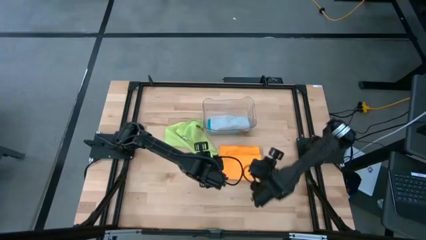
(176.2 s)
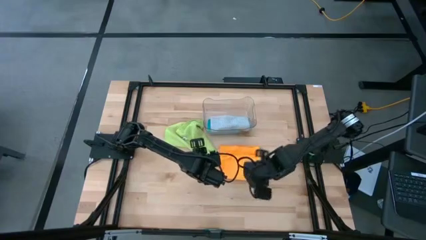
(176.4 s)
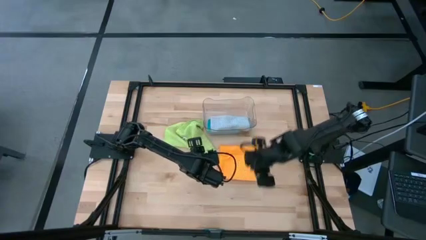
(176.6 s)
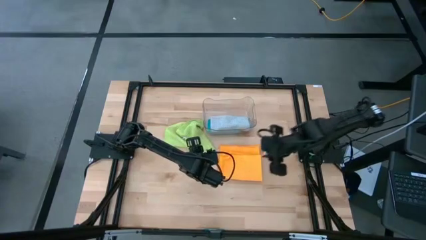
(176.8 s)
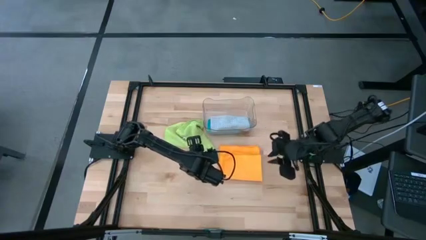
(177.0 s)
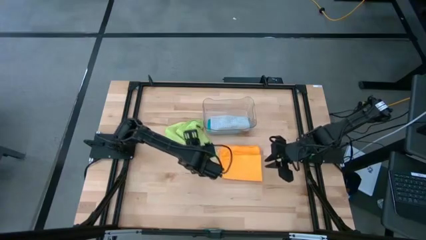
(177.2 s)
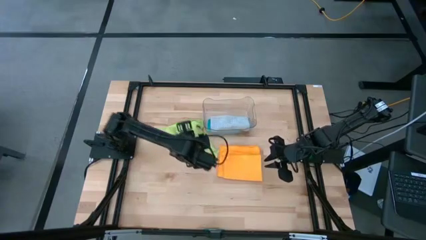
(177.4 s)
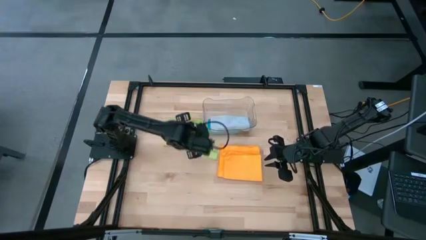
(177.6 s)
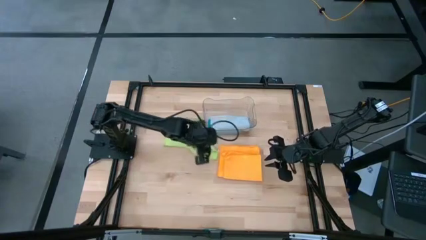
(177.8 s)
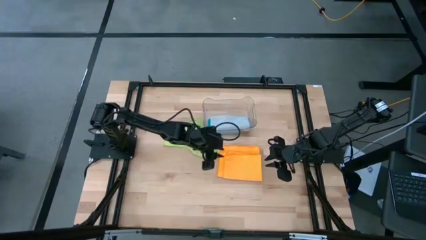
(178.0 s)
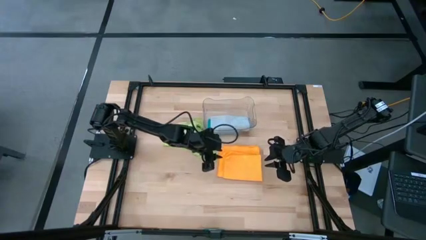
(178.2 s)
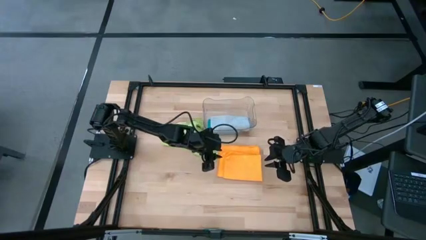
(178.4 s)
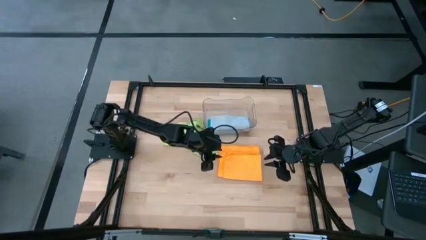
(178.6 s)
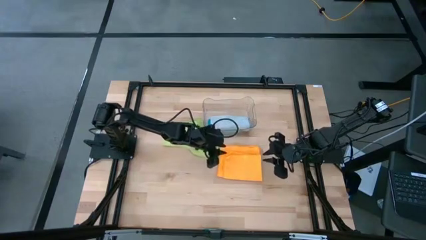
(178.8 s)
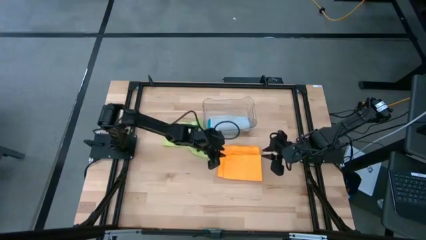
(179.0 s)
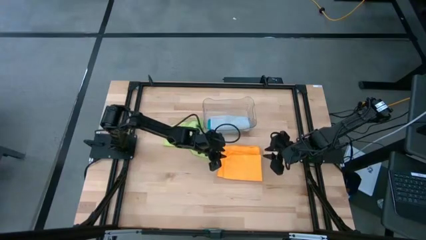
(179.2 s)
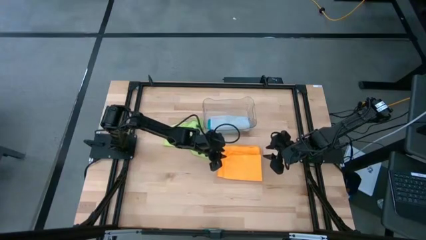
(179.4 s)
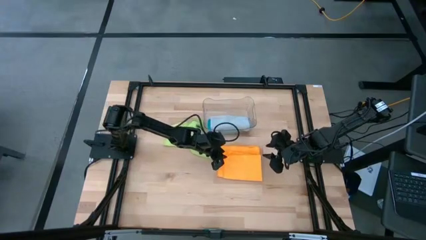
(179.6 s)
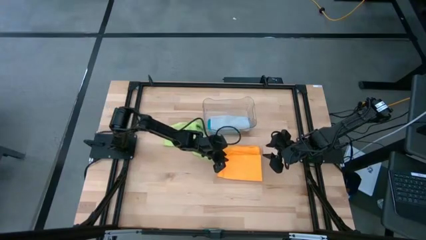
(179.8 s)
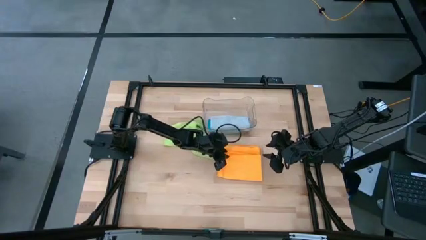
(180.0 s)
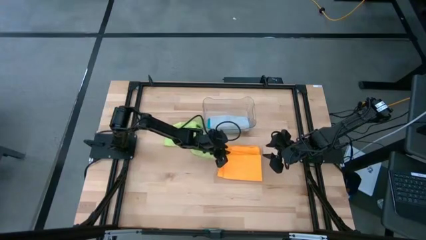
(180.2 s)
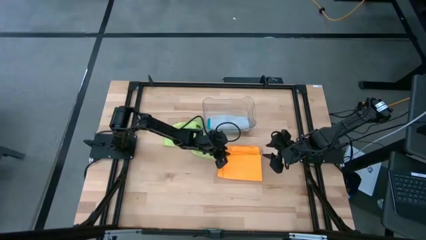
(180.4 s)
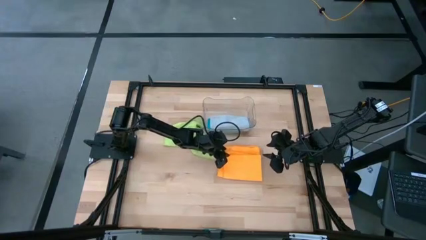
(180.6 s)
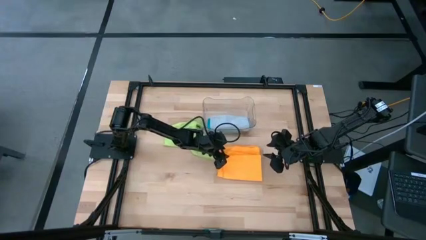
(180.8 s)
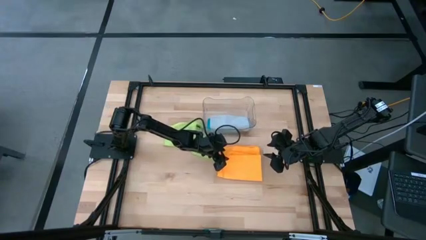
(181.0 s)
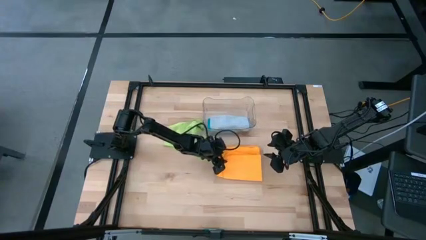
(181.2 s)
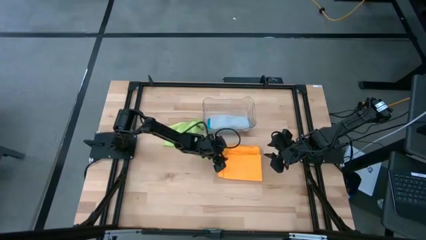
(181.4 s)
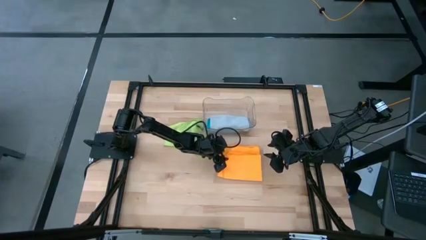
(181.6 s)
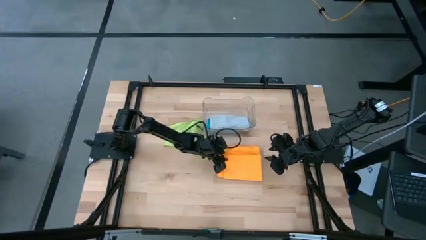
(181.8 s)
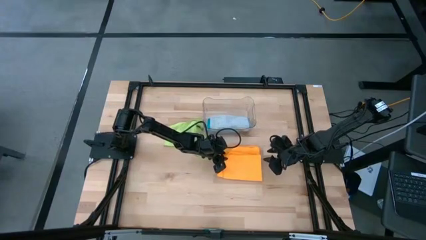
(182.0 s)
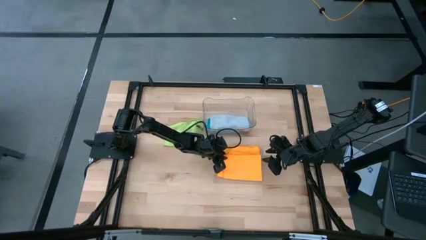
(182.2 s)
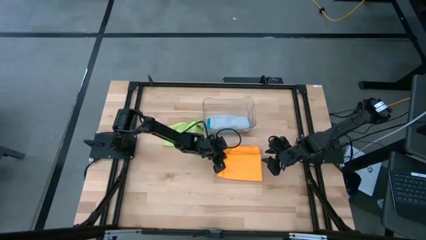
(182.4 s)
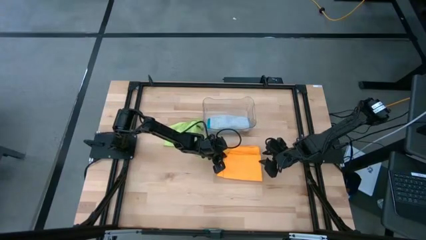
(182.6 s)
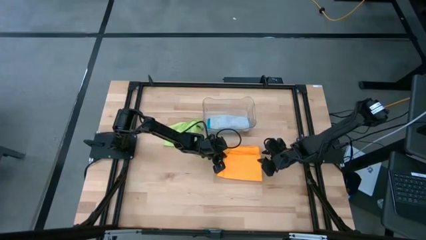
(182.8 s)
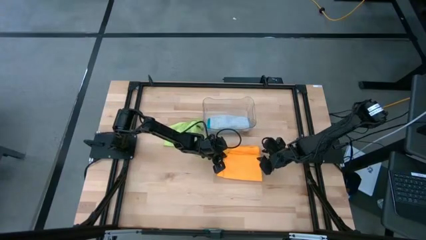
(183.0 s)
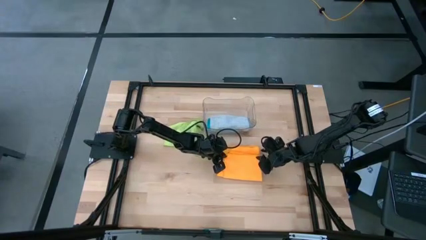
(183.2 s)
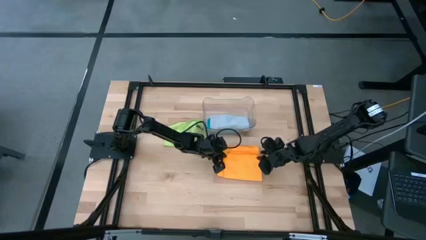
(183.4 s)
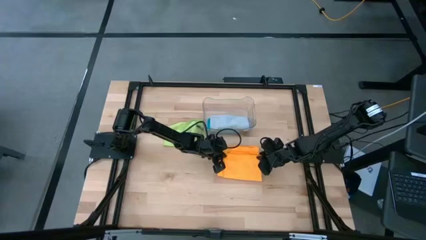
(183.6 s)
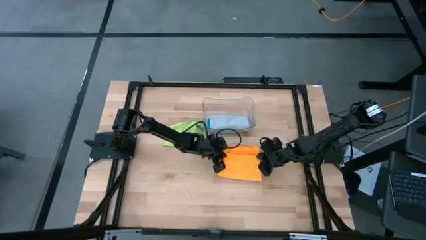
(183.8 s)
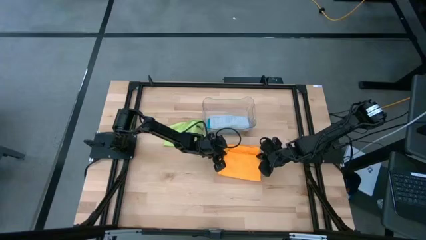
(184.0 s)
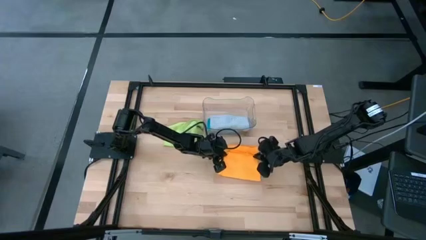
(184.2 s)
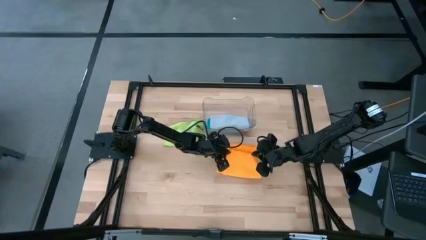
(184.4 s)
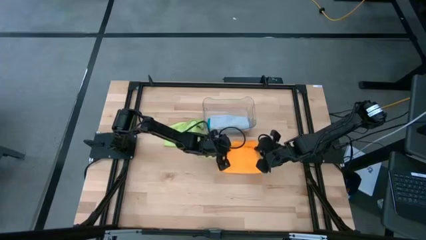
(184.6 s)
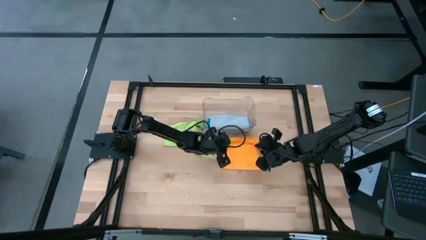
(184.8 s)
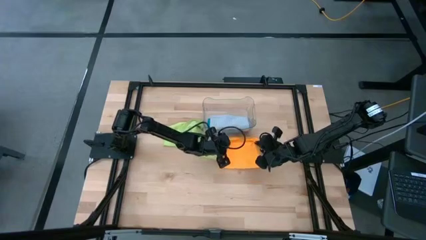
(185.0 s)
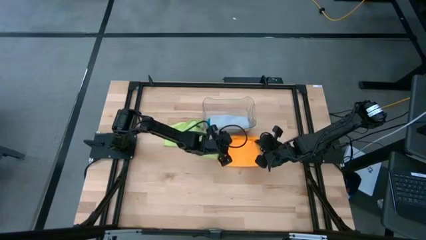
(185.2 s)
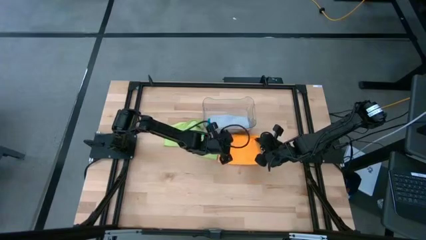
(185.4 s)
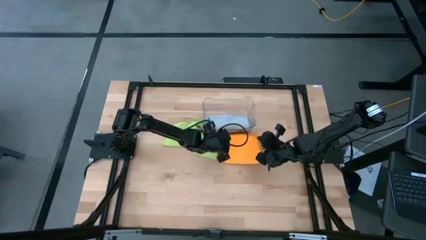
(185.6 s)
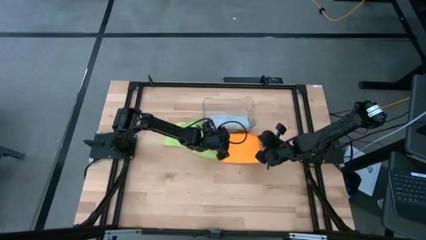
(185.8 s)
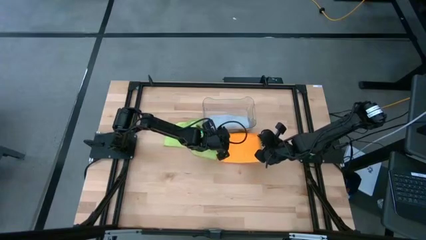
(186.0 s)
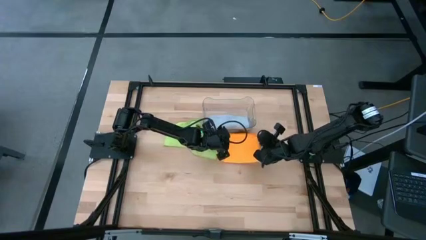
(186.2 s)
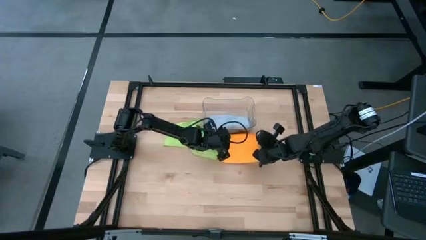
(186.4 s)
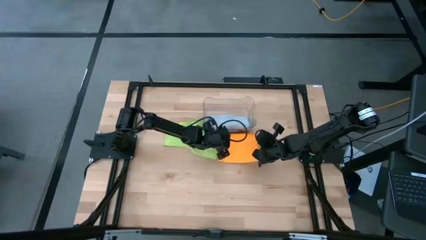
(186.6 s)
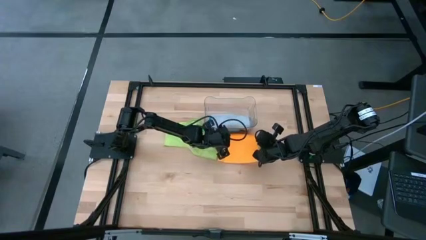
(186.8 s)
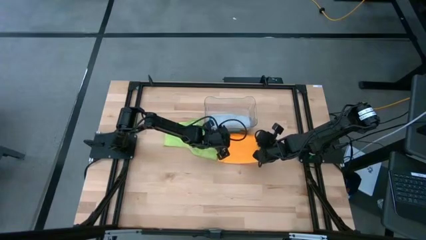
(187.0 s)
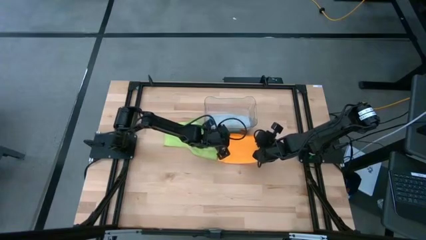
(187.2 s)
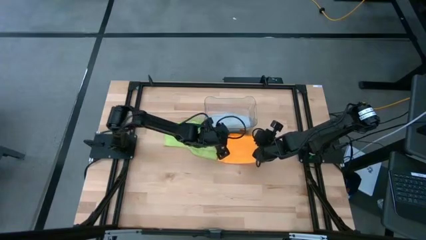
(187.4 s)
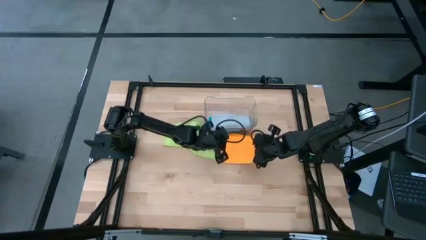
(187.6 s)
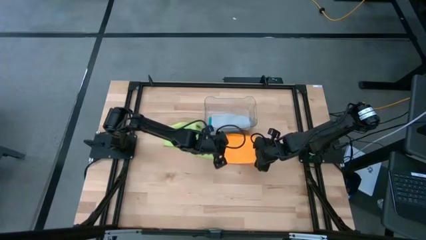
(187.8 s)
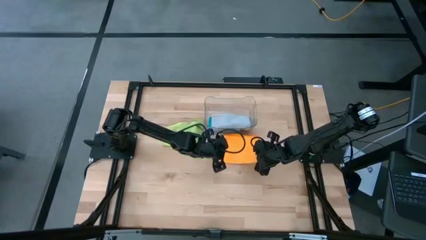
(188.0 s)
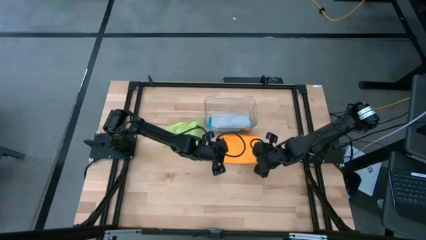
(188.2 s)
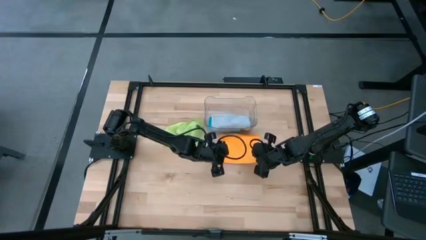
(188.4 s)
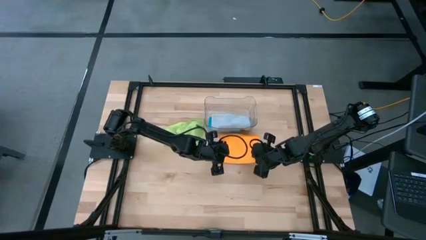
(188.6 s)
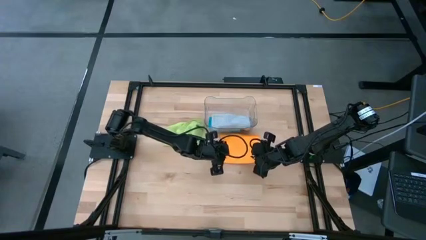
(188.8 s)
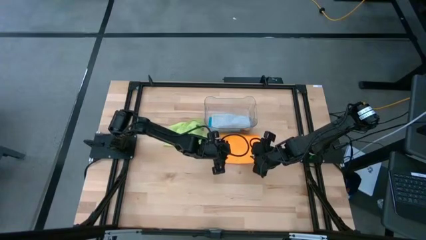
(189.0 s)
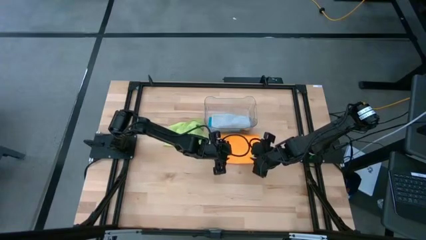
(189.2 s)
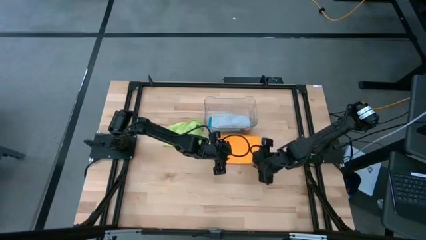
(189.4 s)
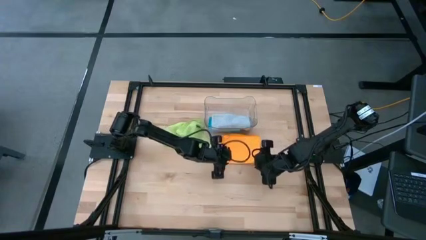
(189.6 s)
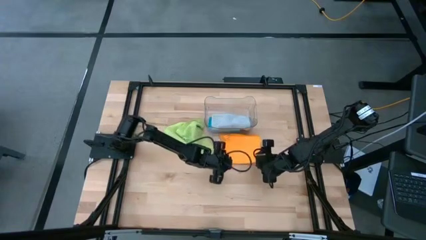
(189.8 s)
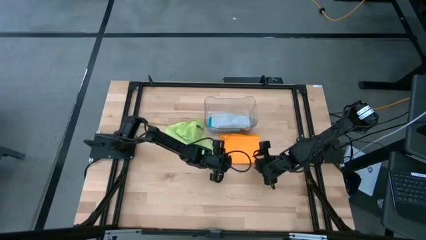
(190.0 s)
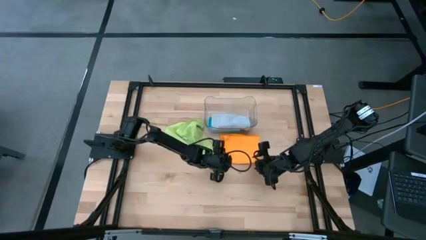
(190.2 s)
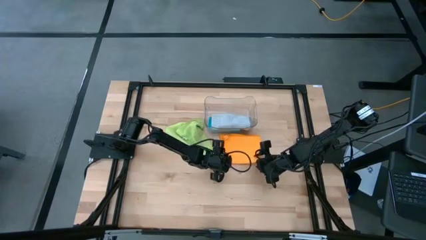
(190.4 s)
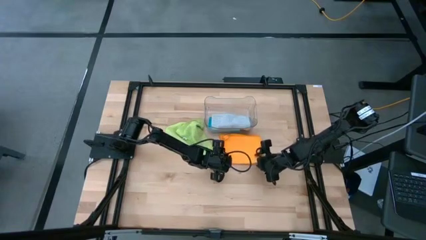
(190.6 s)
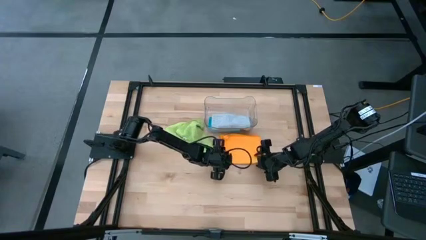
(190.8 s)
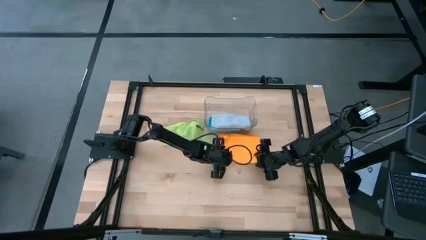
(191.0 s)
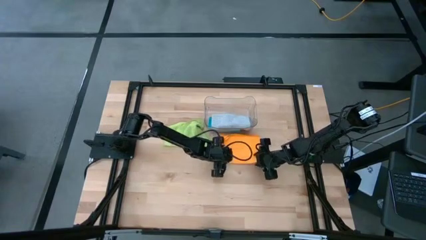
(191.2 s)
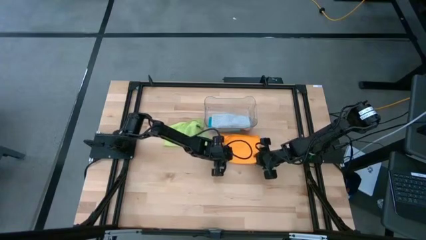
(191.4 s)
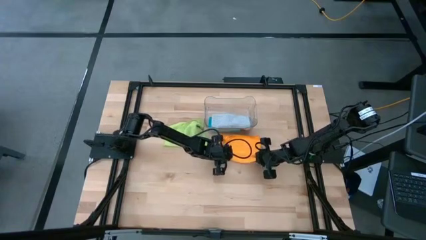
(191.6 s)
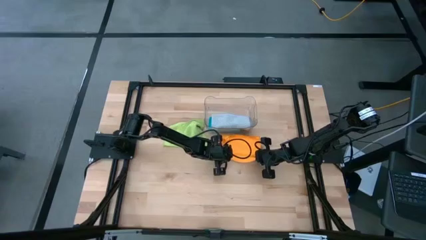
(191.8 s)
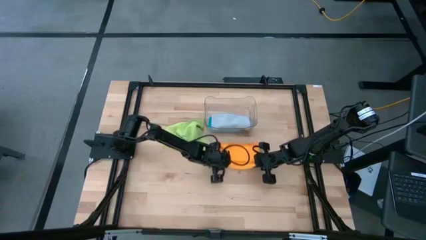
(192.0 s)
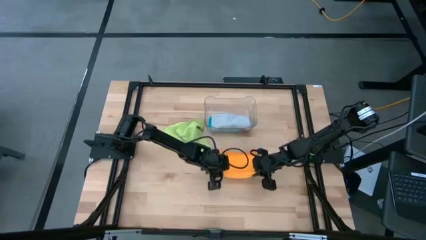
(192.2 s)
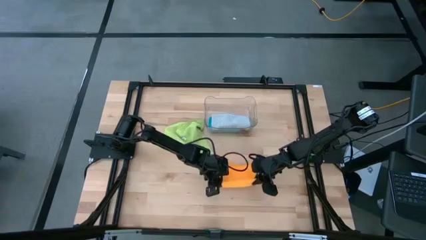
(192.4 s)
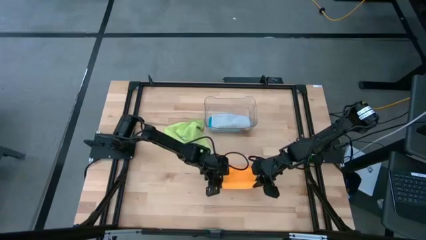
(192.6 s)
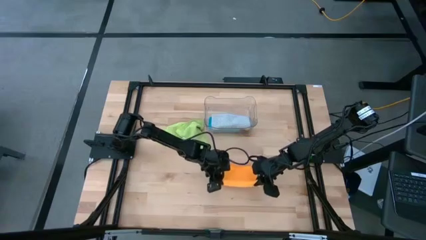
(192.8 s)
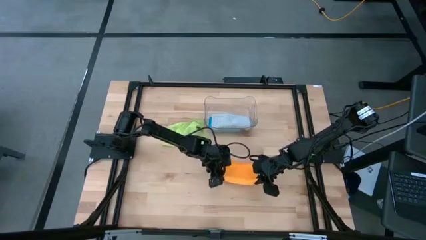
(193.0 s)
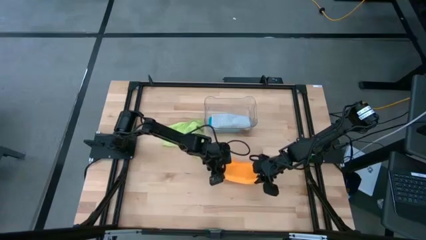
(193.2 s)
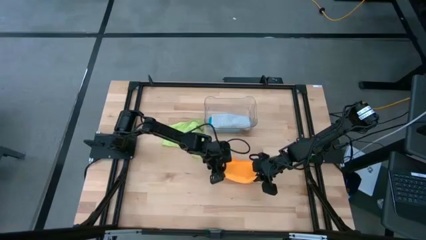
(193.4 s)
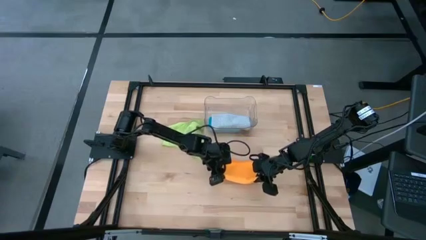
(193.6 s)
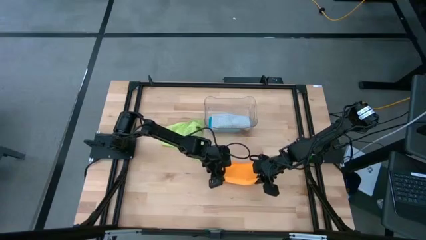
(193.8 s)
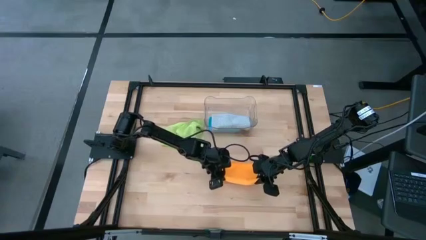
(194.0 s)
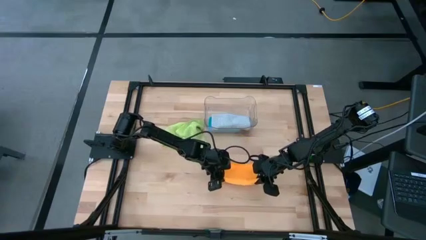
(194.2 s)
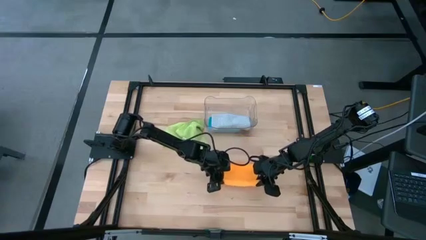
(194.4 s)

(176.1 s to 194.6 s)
Task: Fold microfiber towels
Fold the yellow towel
